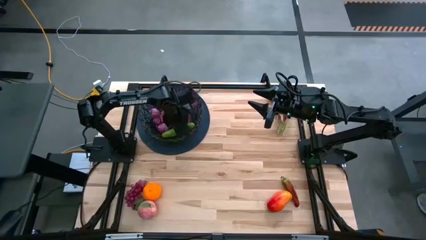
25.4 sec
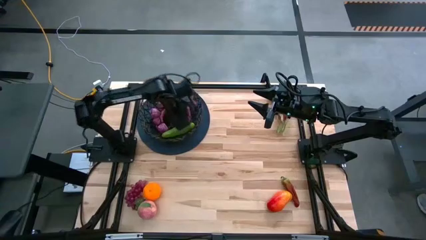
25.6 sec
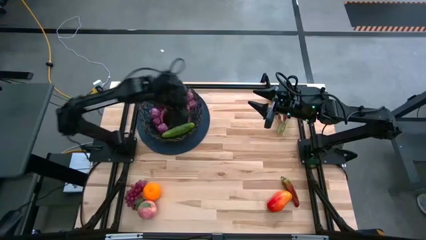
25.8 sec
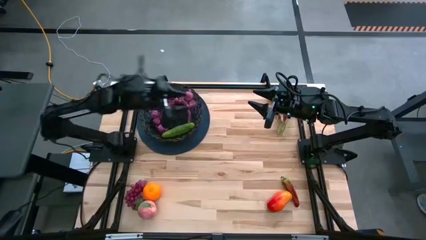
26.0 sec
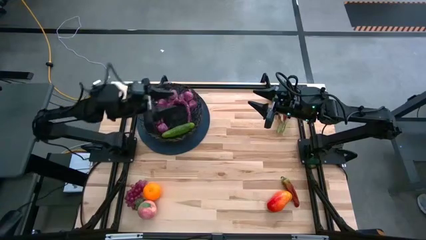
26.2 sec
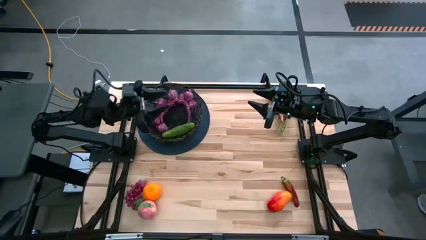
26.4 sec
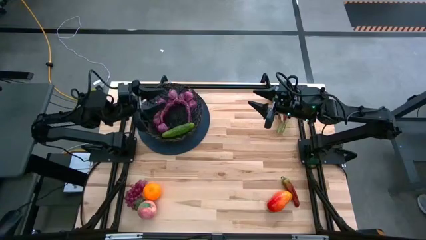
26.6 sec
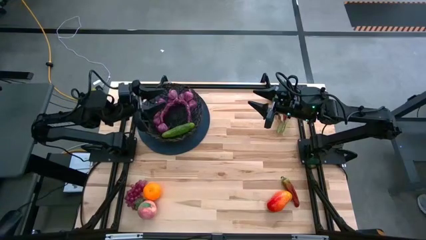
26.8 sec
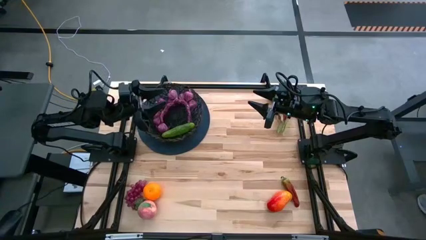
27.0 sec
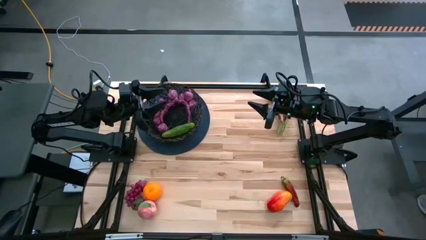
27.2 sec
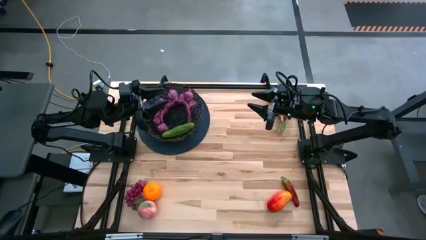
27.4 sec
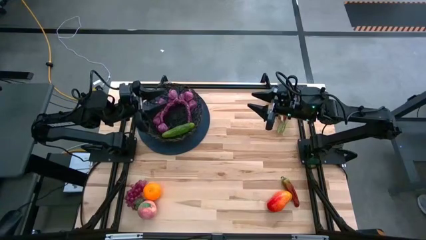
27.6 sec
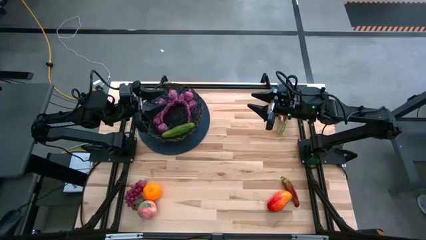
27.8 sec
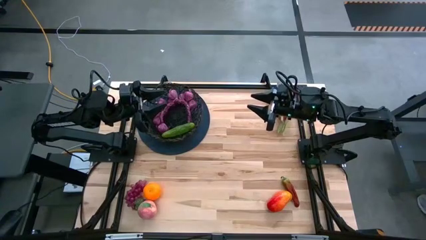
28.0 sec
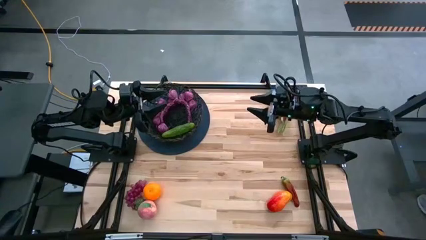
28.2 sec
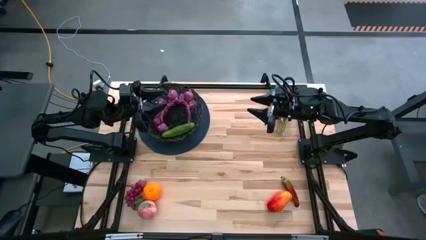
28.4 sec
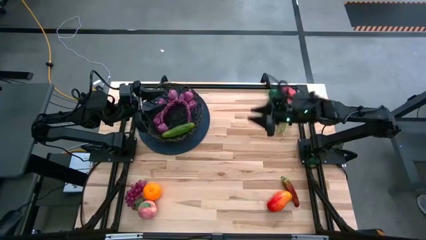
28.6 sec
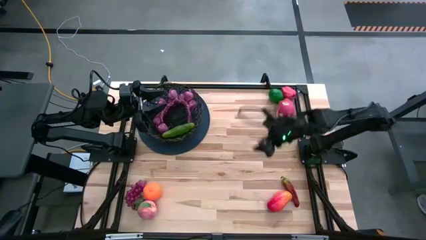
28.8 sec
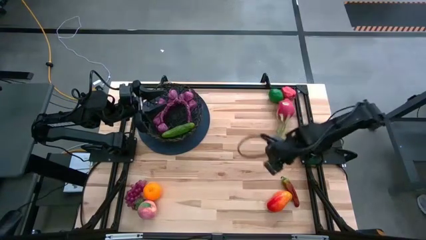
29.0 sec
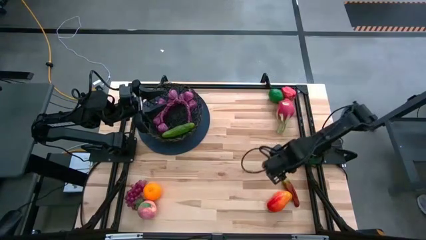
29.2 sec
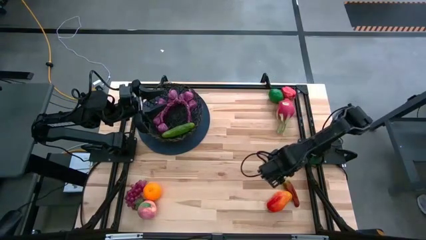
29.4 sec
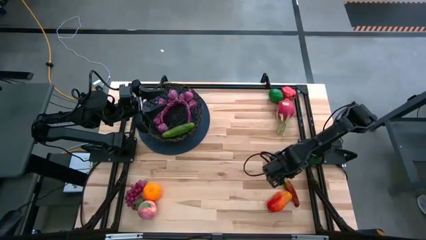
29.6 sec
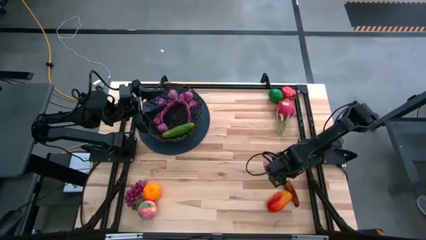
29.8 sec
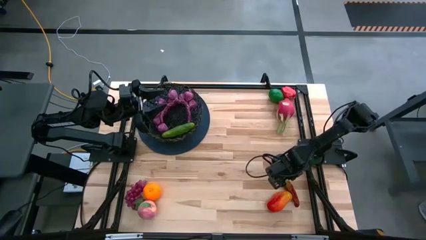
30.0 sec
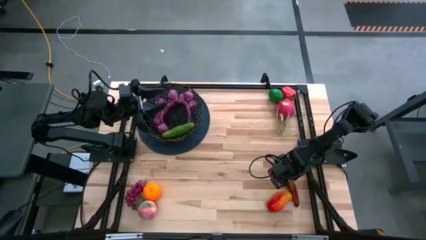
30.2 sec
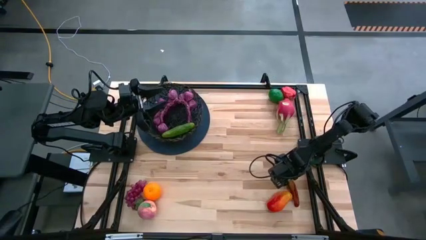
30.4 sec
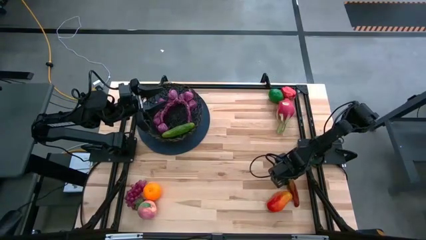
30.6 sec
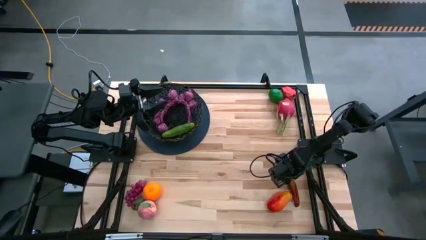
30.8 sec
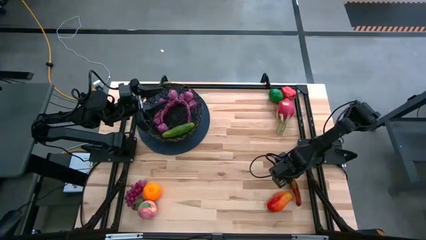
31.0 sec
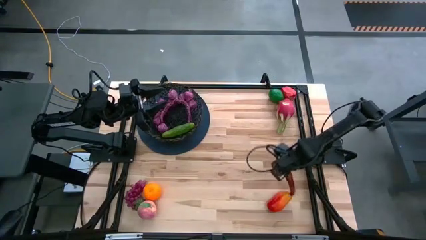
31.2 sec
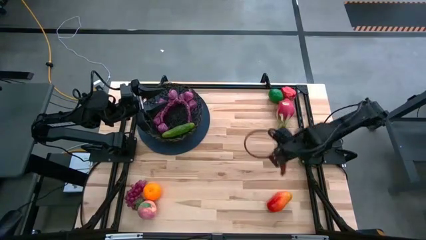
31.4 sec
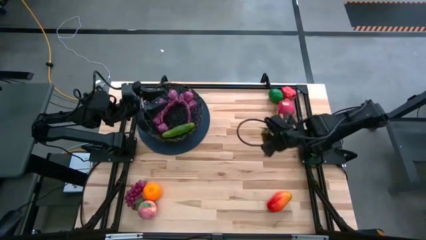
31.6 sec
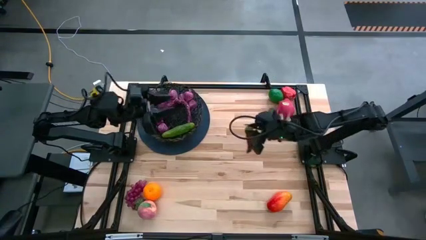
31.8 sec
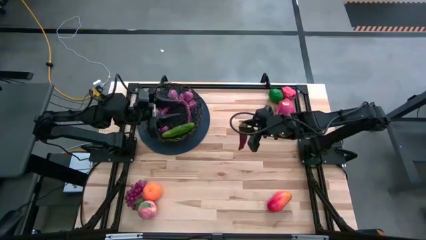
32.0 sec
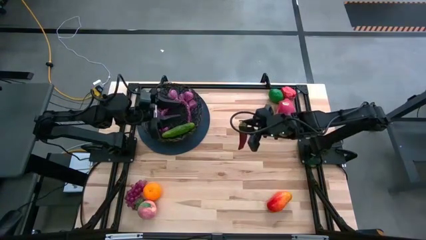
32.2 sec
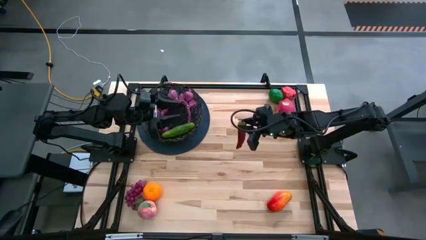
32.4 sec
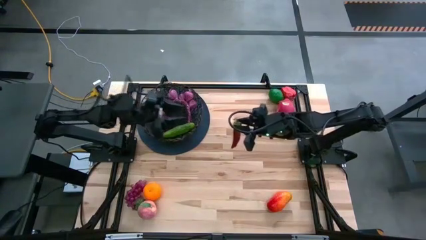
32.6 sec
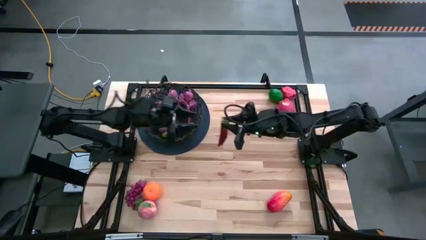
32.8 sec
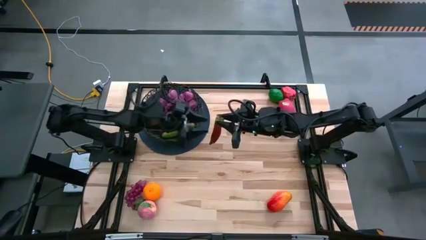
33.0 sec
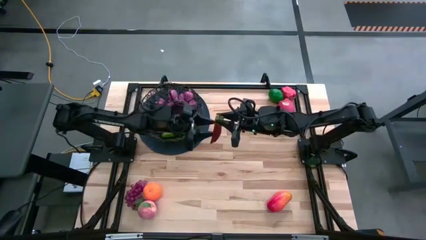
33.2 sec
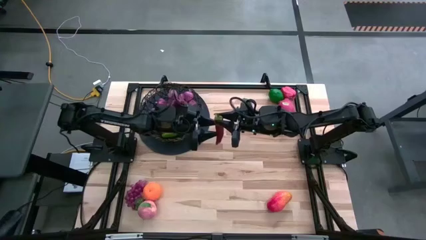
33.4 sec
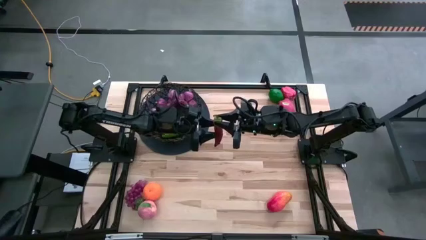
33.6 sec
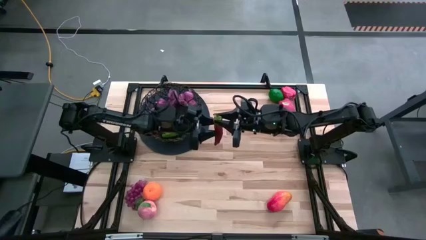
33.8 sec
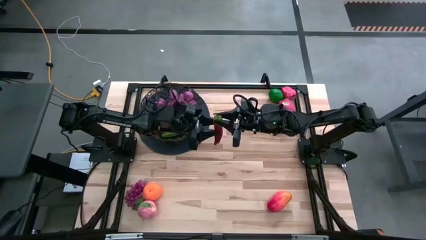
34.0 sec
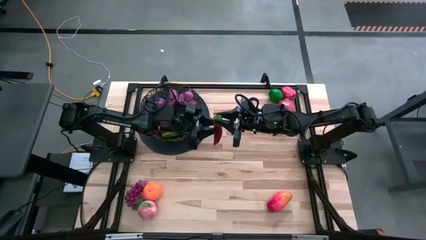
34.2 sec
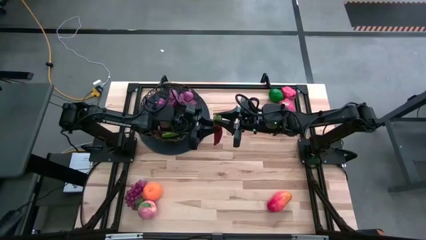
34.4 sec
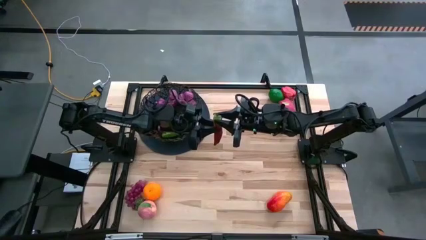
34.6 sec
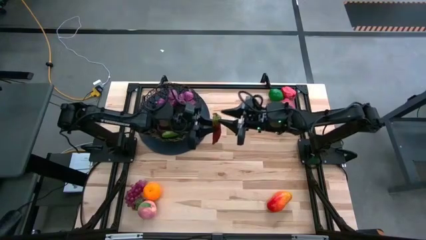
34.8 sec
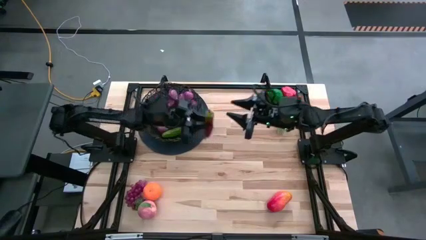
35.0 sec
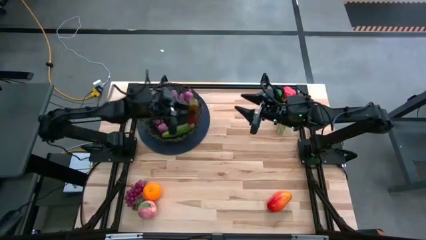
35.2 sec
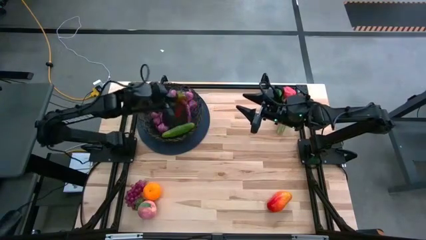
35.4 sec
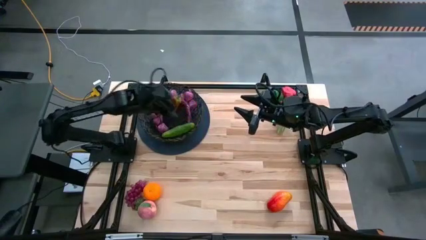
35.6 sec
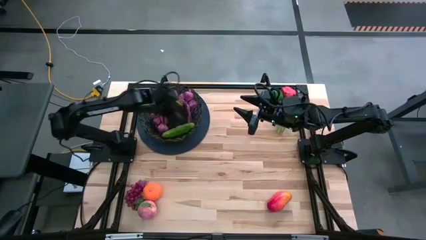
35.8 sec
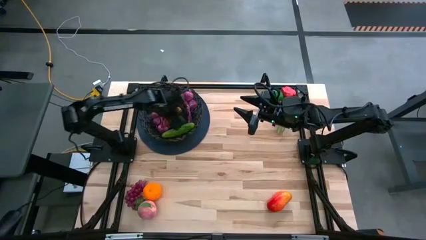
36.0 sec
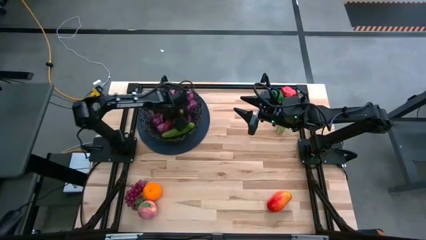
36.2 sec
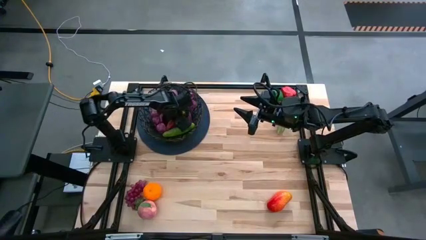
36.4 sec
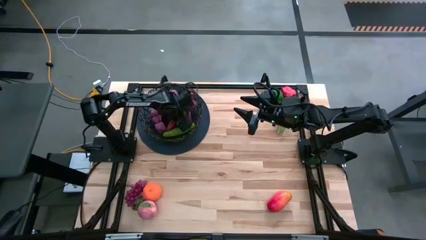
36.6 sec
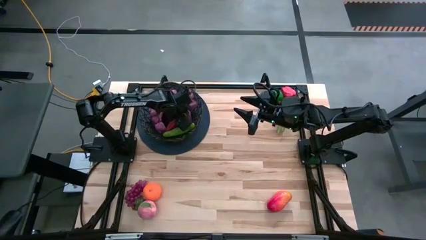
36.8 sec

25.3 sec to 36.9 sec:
Task: Build produce basket
Put the red chili pepper into the black wire basket

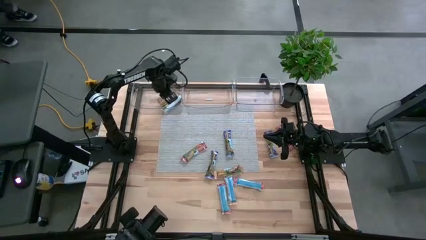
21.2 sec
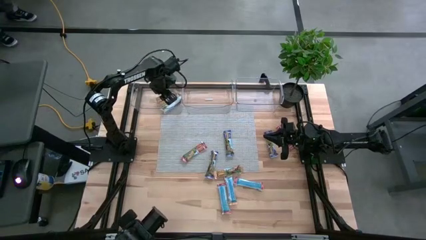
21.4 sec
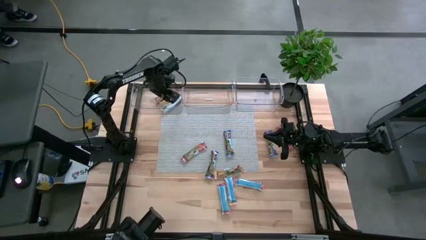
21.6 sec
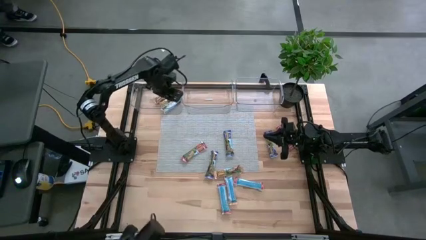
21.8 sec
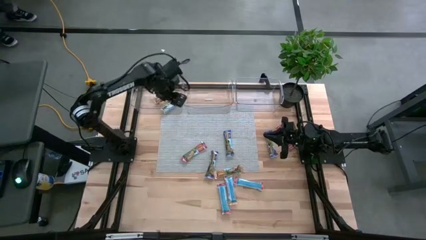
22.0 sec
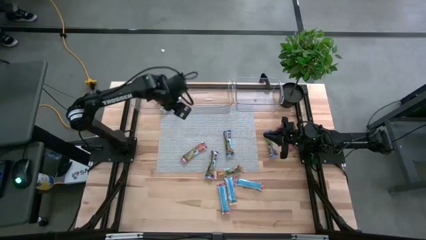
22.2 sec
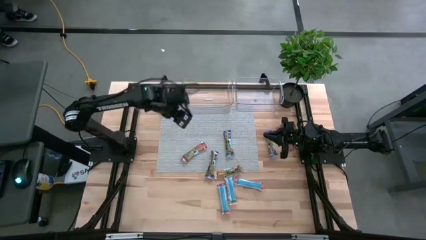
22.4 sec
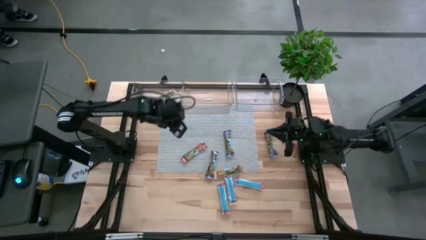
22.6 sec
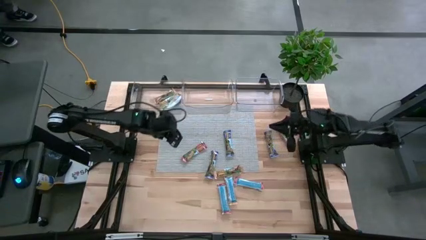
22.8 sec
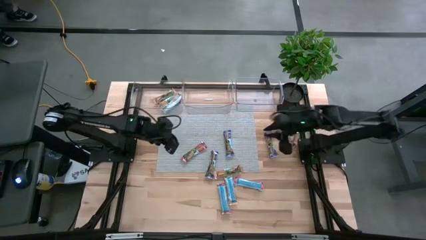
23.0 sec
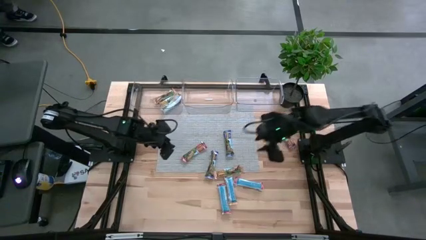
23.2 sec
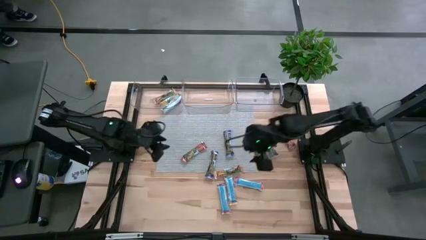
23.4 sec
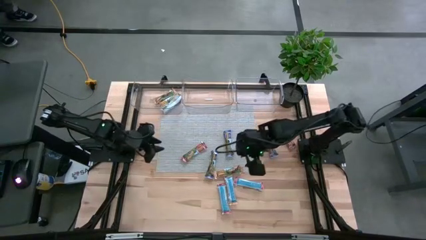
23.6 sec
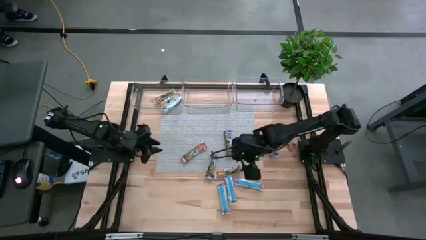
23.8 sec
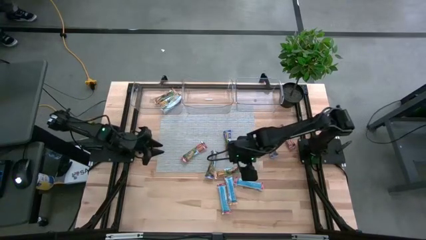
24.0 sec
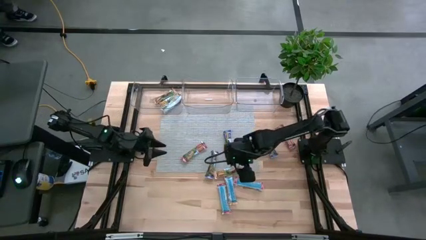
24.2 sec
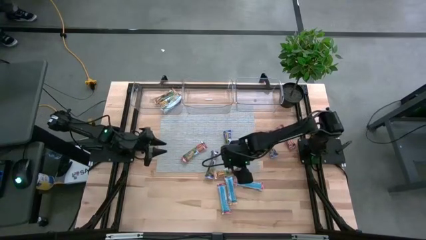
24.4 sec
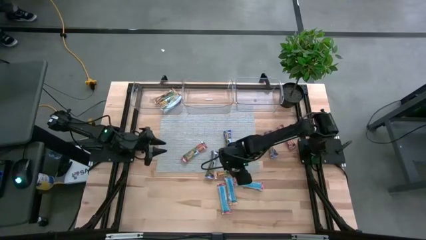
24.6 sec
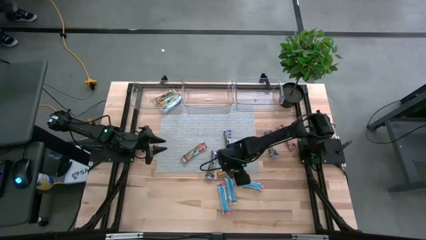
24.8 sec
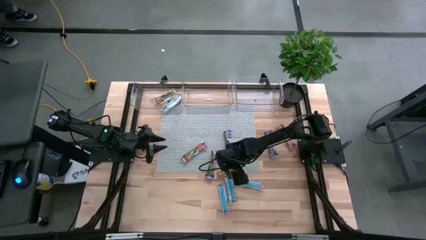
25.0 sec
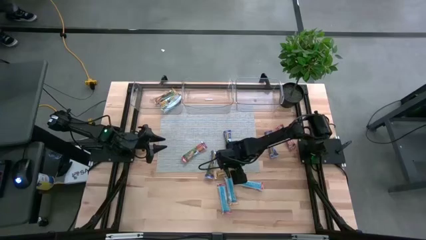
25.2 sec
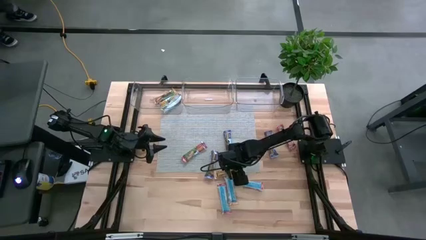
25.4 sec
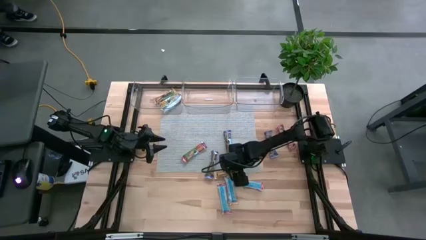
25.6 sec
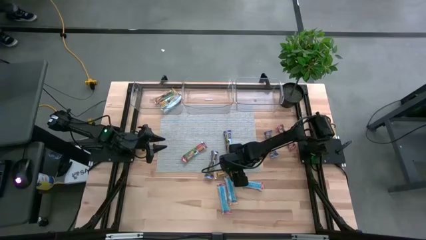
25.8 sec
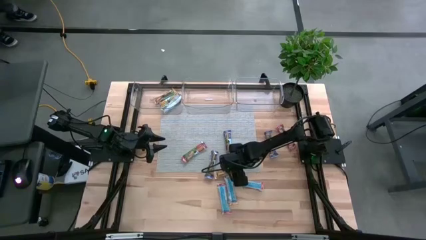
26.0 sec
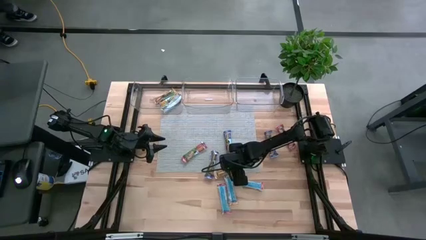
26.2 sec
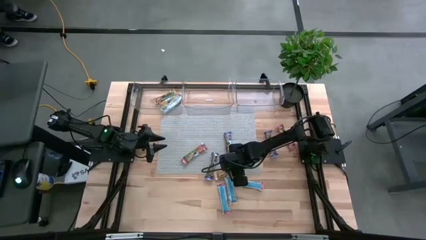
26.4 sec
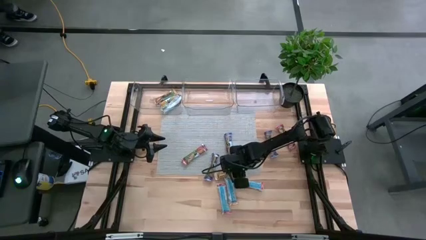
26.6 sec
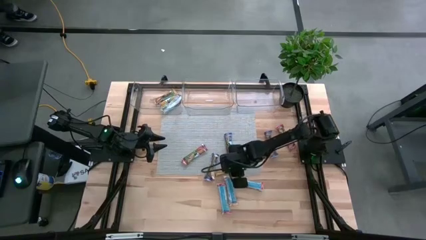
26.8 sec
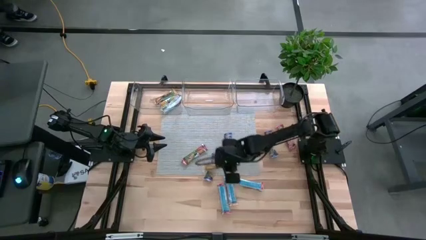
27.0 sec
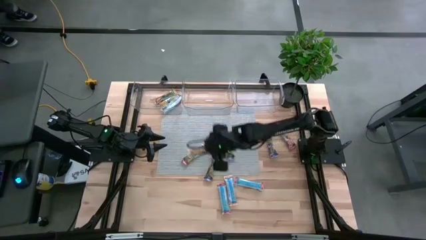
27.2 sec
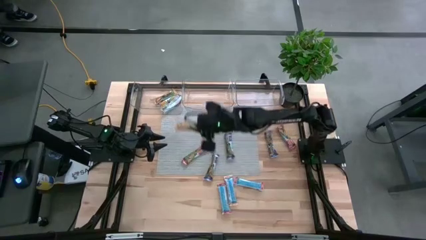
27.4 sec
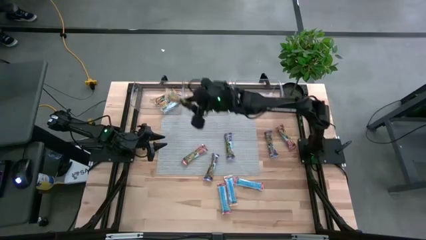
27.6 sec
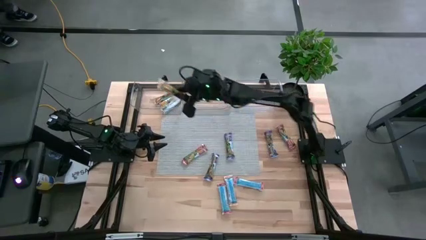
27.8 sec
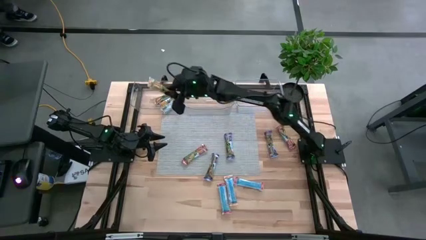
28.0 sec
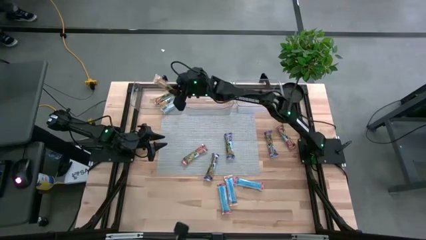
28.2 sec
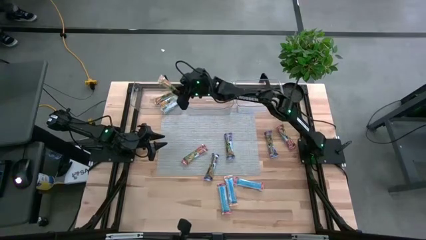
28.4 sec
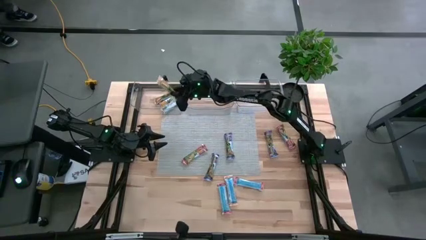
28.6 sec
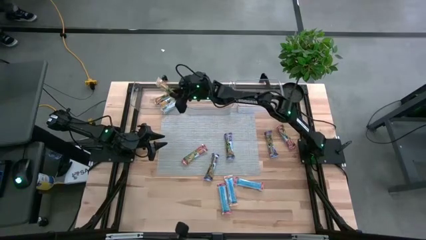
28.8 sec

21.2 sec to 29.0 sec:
Task: Pick and place Granola Bars by type
Put the yellow granola bar into the left transparent bin
